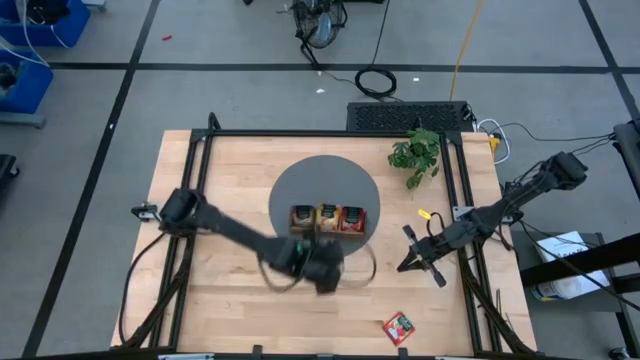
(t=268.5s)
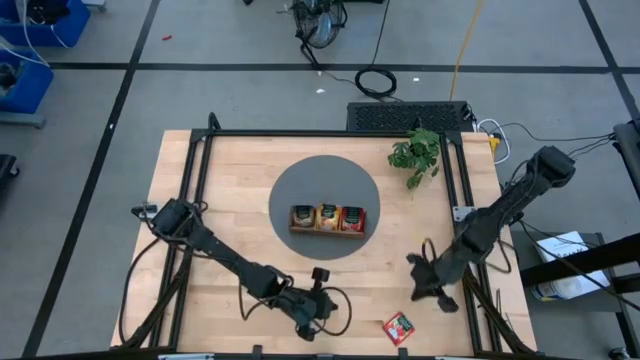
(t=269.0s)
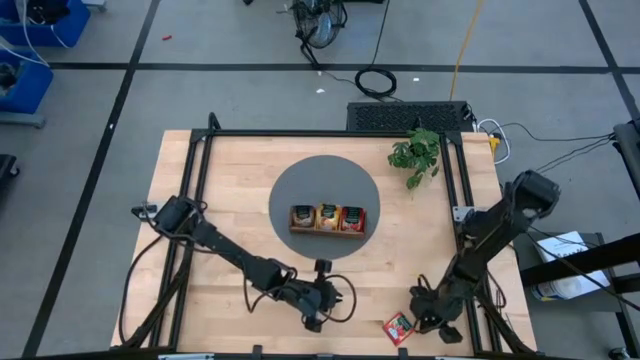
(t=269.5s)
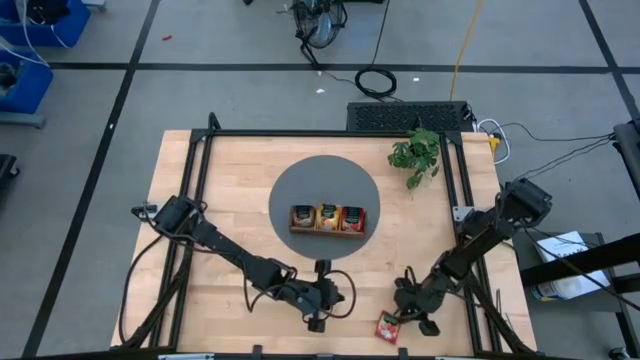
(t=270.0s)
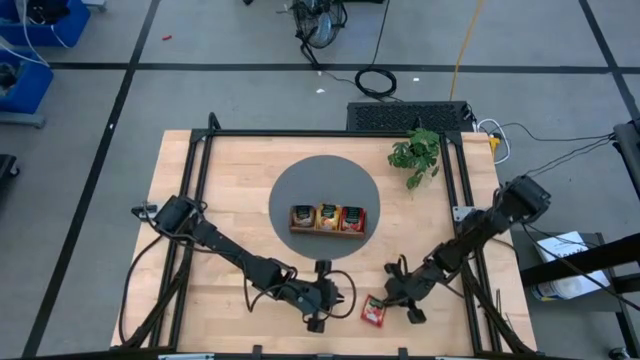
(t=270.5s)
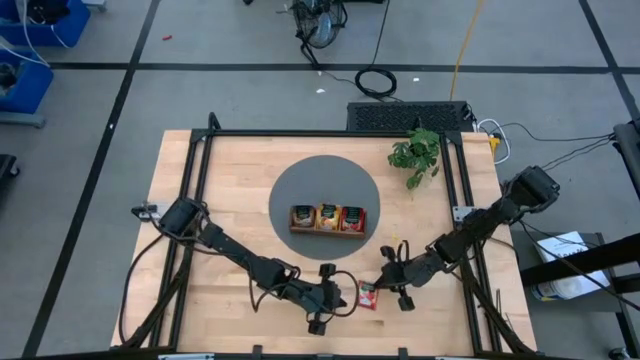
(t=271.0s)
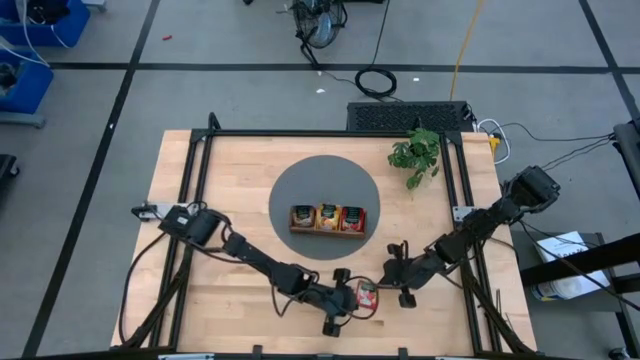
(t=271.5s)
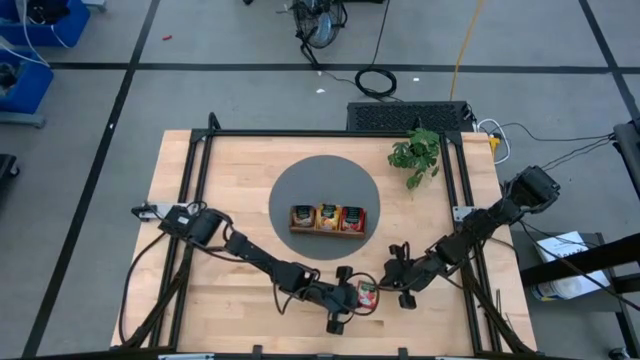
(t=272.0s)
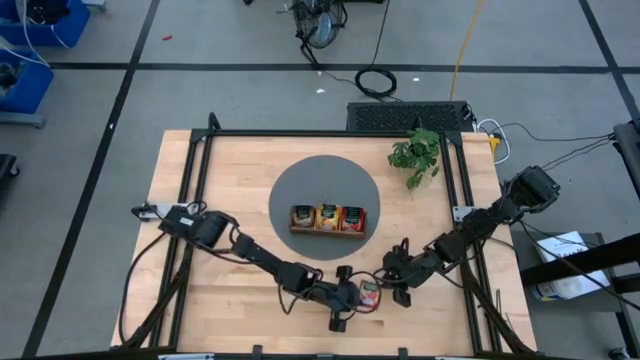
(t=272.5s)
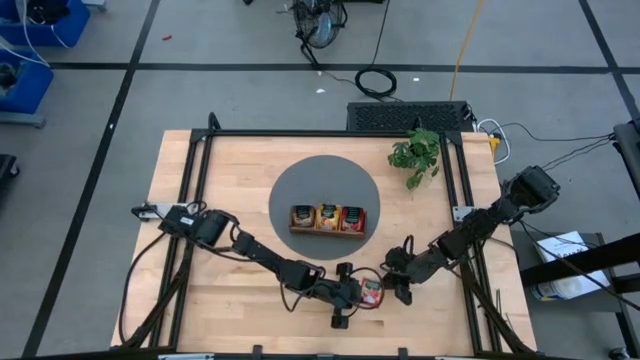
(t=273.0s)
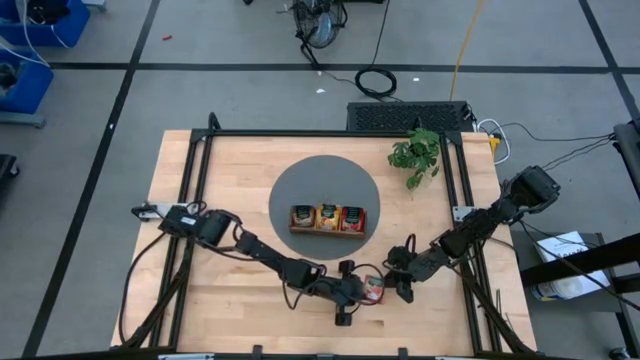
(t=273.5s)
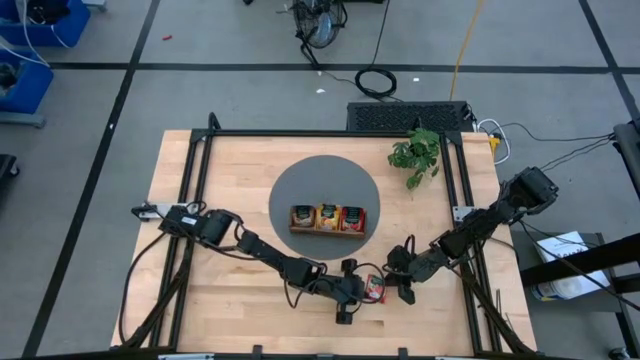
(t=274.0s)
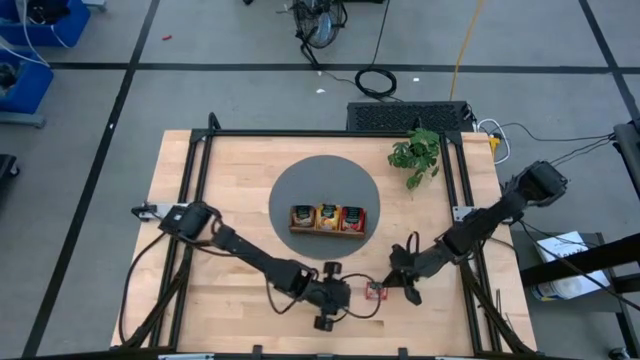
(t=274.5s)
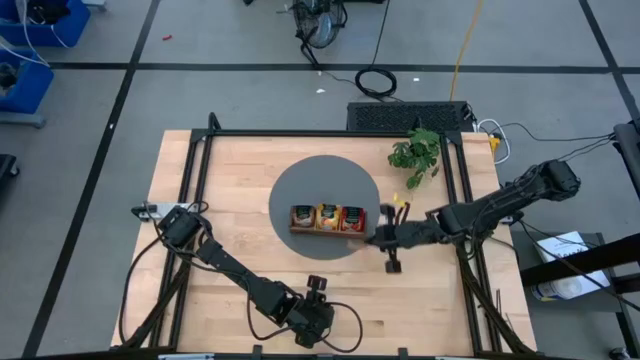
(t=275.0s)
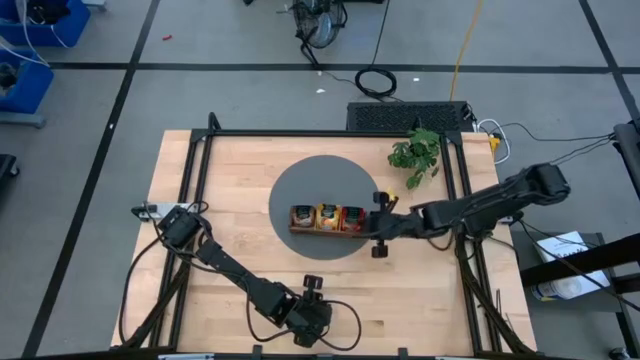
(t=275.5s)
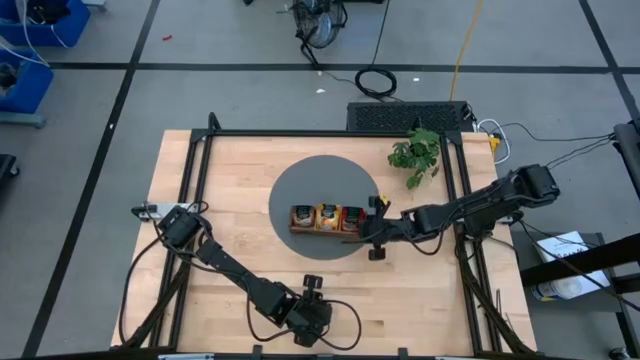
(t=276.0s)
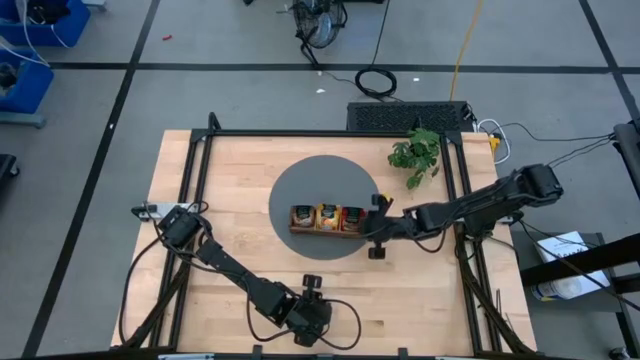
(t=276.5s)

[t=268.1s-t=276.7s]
Task: Pick & Place Tea
Put the red tea bag into the right section of the wooden organizer

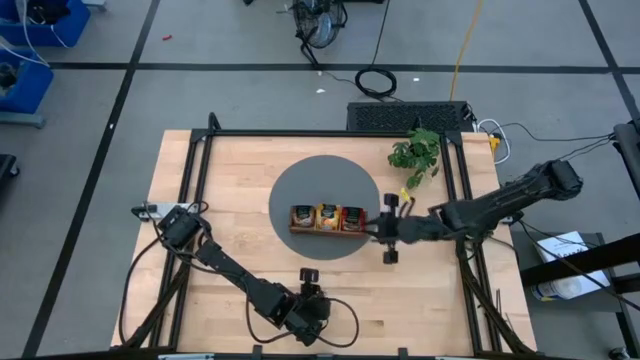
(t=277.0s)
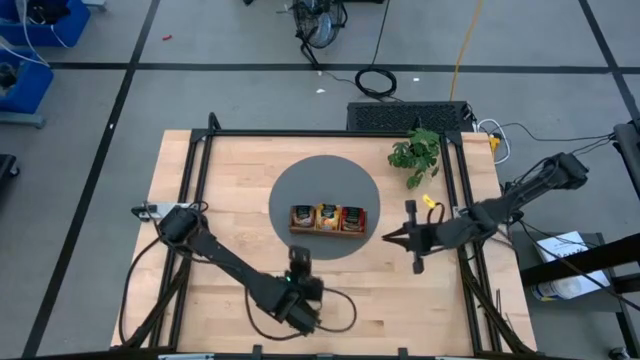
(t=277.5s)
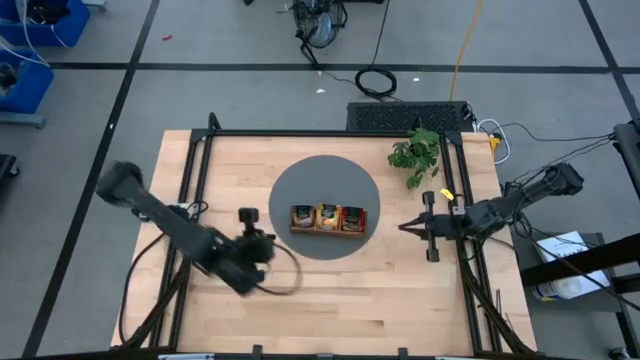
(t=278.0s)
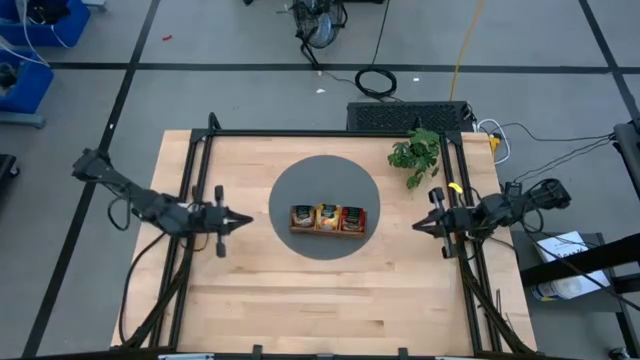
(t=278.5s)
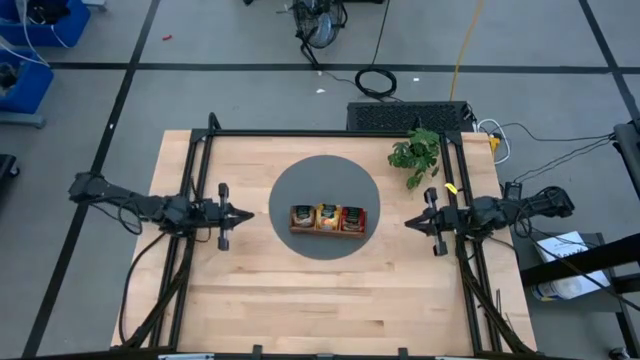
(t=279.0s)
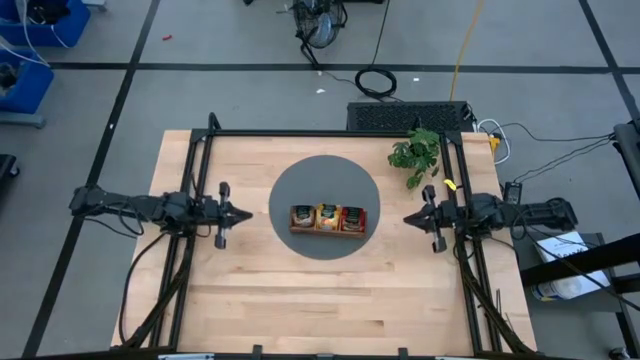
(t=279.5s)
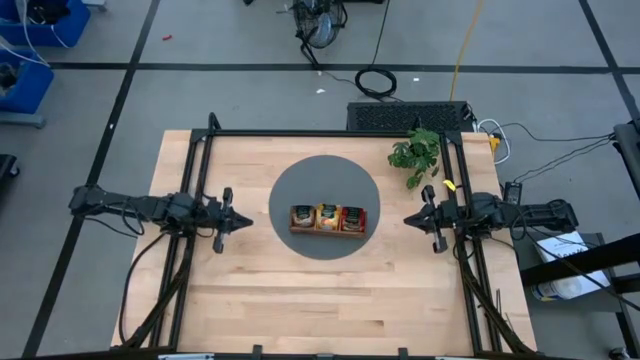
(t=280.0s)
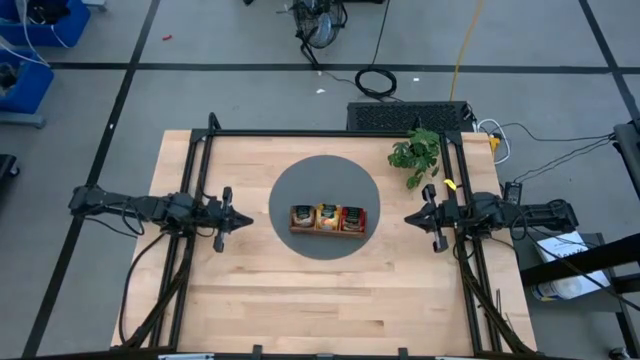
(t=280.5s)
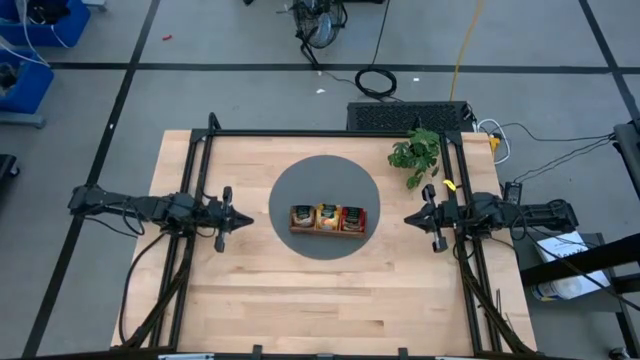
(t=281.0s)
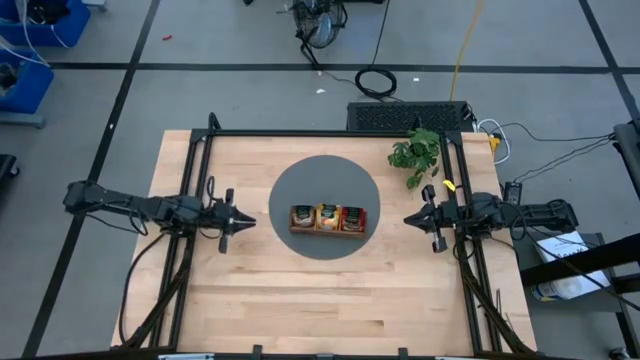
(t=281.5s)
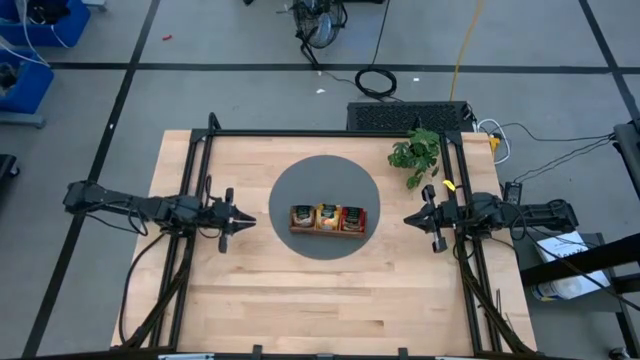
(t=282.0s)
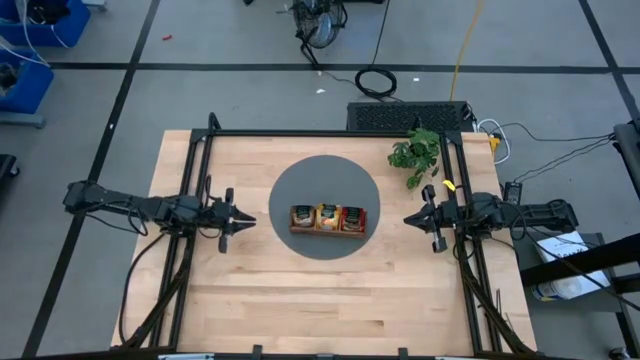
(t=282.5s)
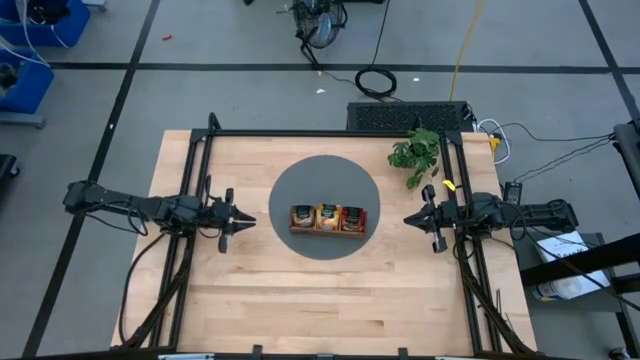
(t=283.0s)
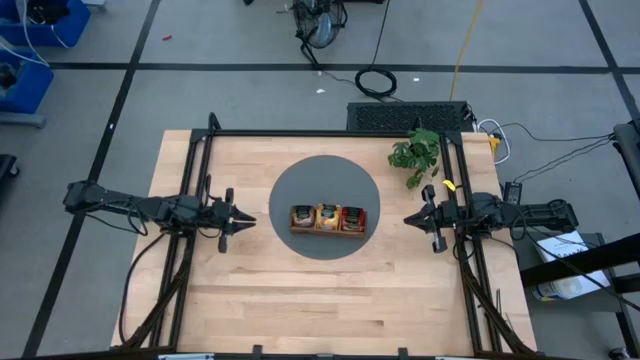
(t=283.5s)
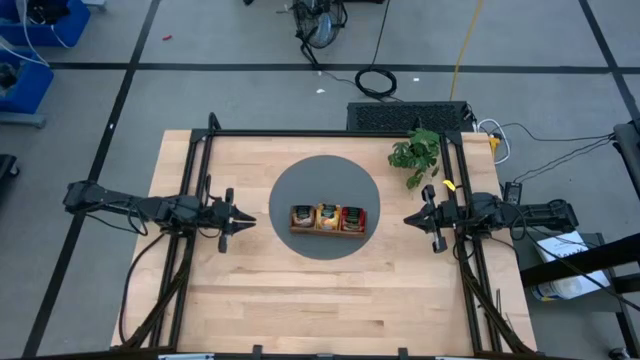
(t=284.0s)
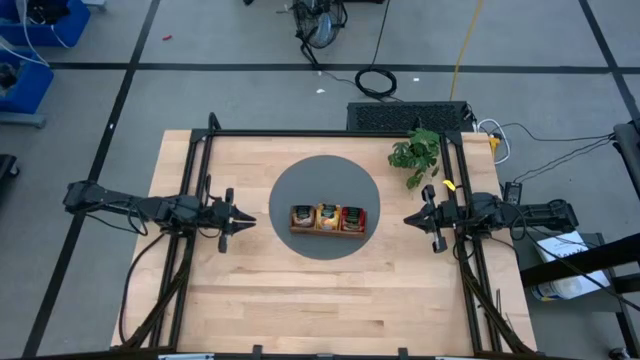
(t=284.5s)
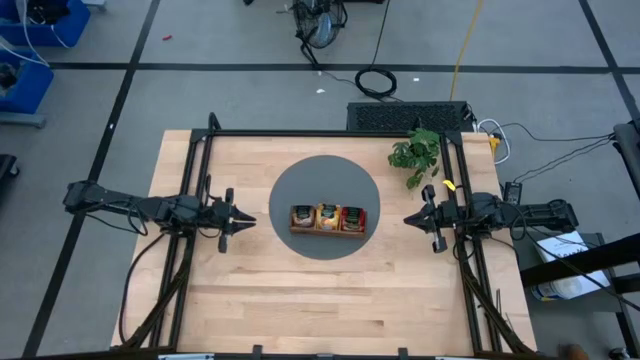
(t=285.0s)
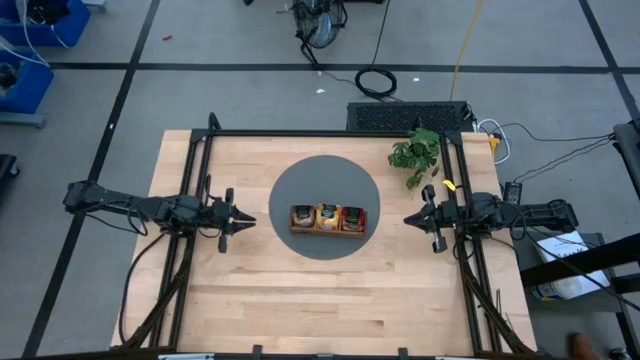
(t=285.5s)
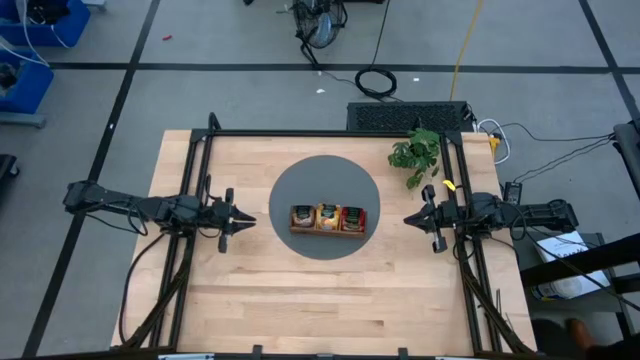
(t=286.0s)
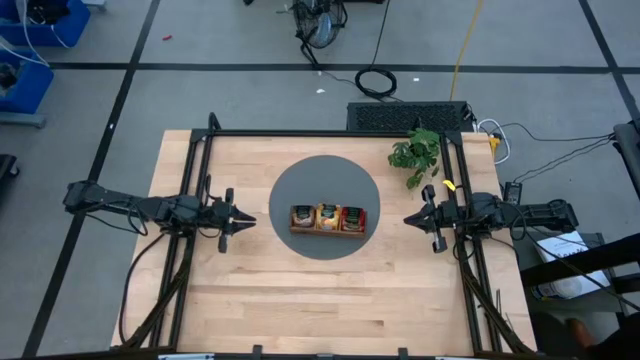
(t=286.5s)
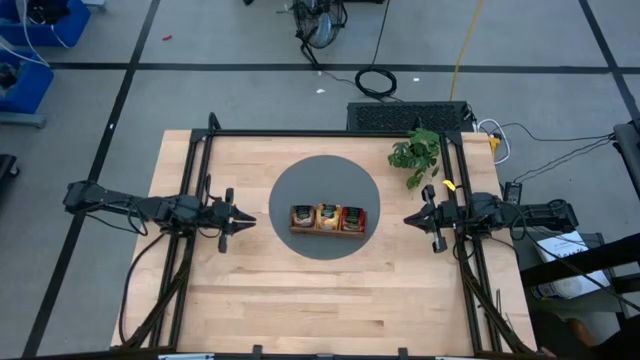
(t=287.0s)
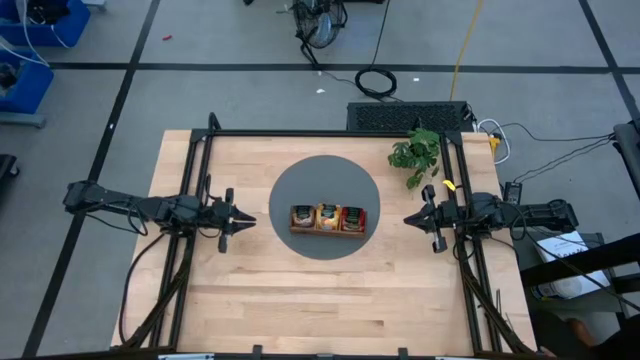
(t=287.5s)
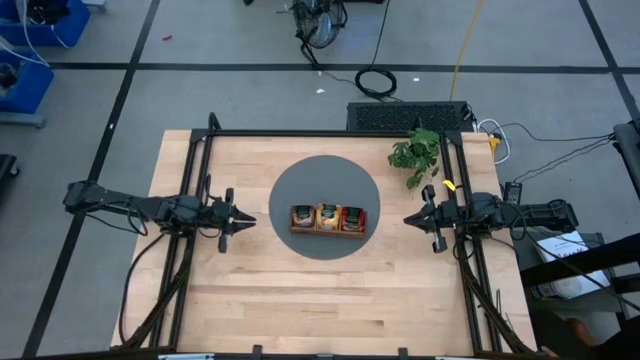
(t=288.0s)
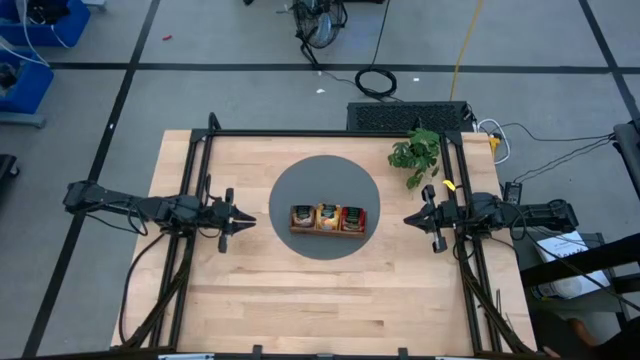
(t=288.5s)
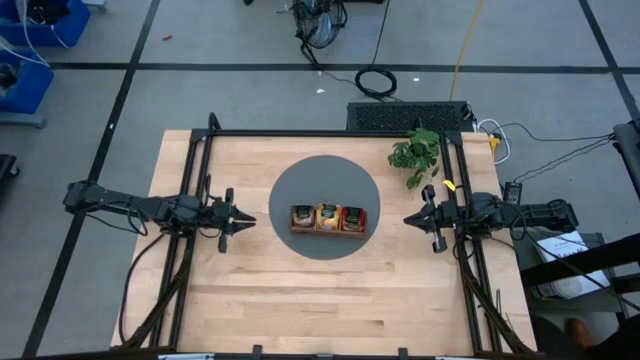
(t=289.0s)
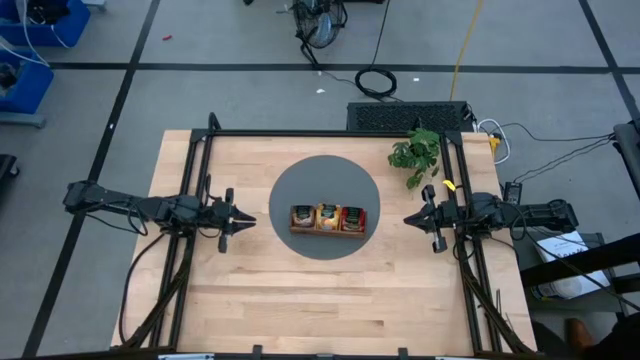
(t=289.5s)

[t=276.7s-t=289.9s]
Return to Home Position

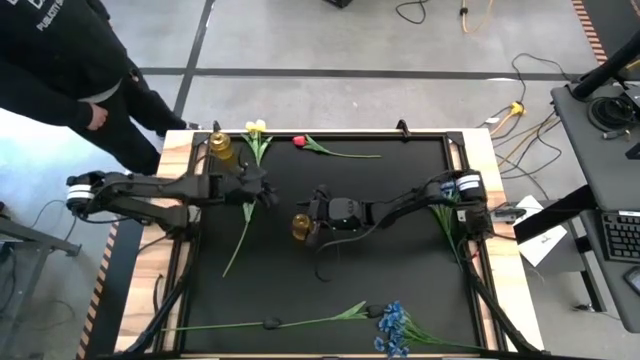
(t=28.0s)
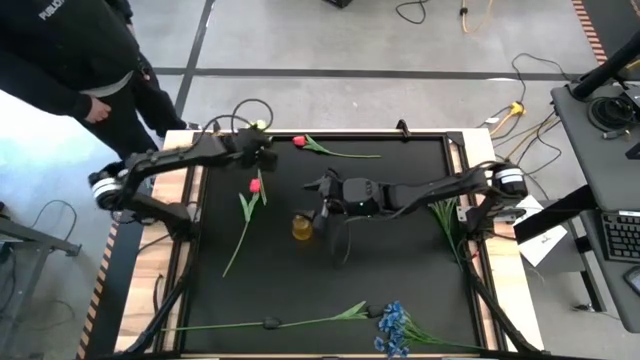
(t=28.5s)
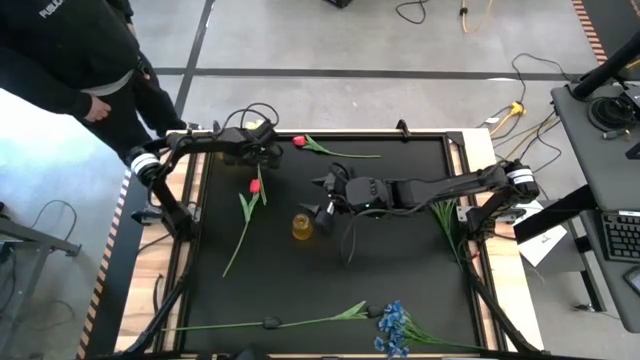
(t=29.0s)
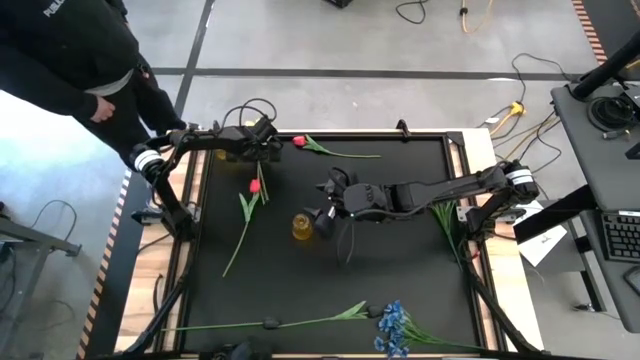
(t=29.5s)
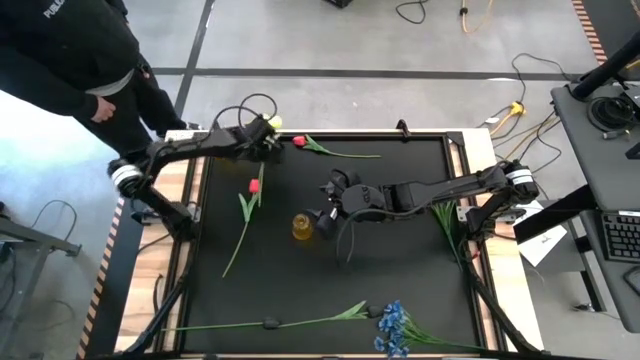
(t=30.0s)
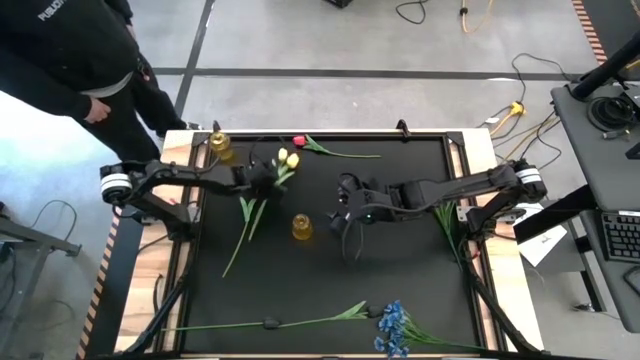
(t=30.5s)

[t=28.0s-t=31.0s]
Task: Sort flowers into vase by color
Move the left yellow tulip
